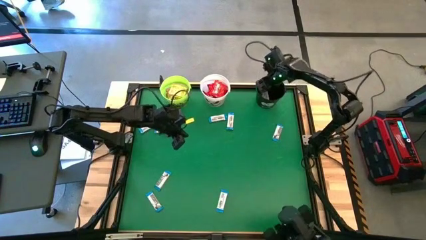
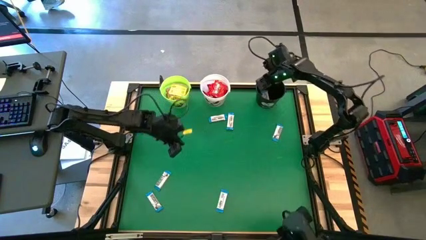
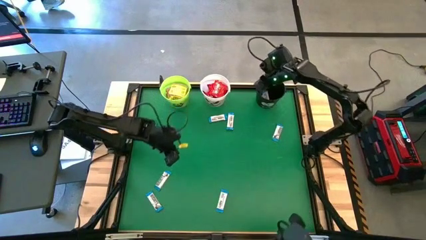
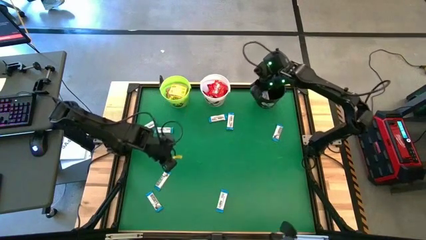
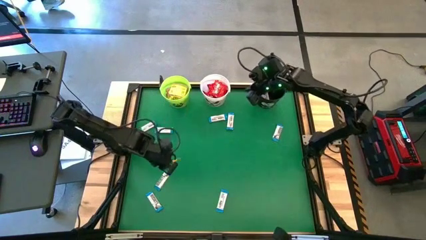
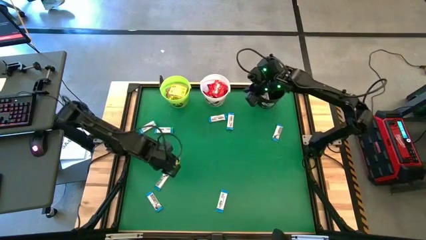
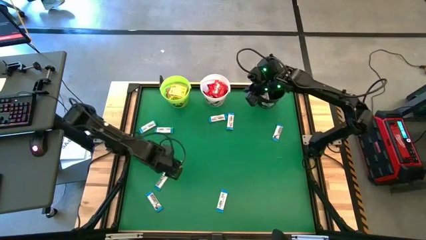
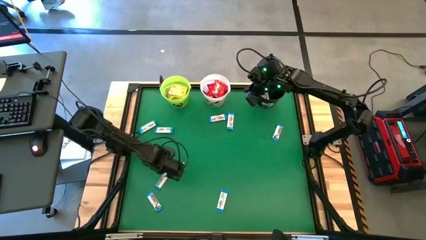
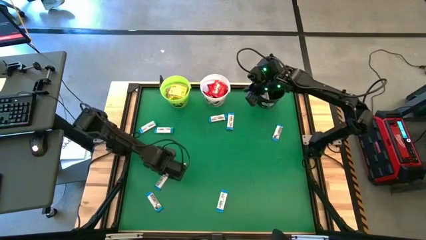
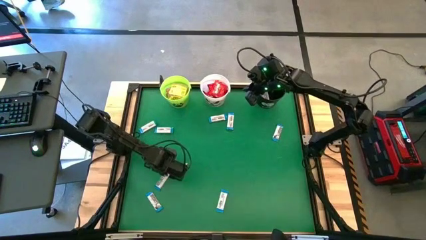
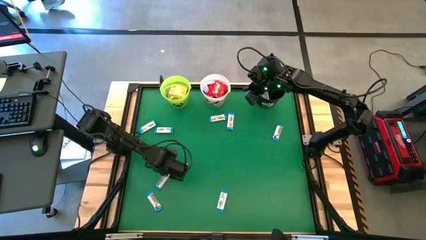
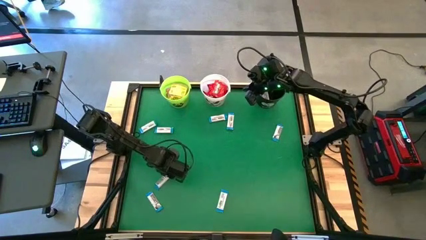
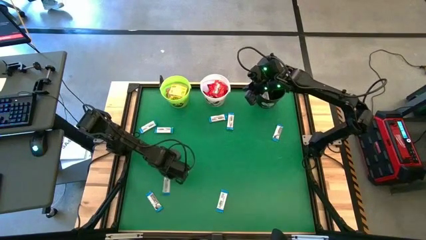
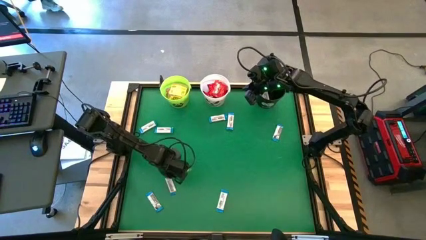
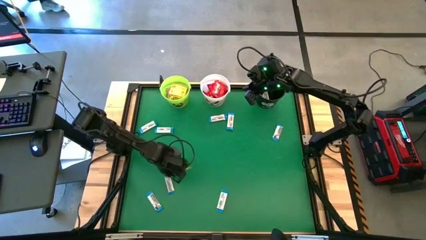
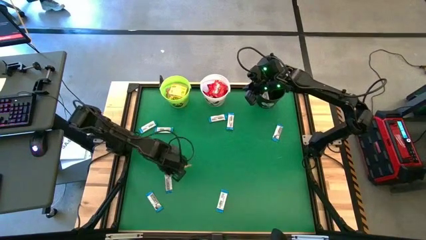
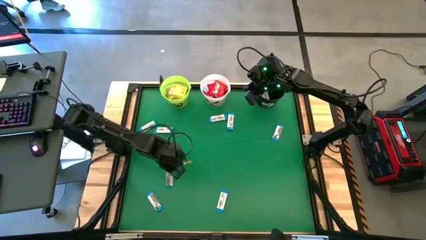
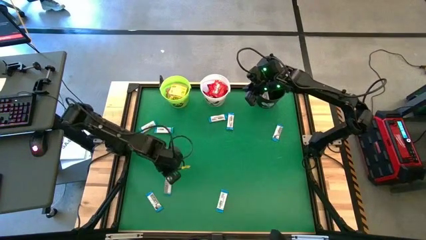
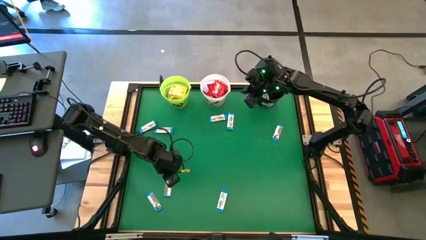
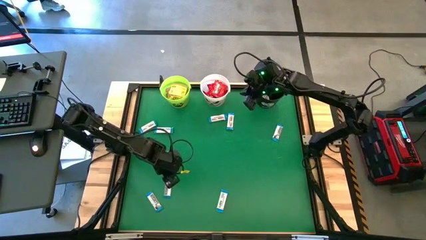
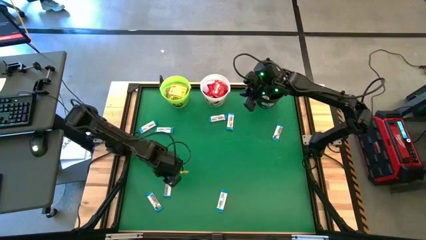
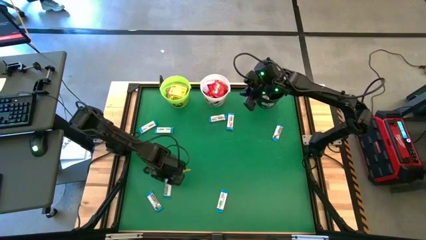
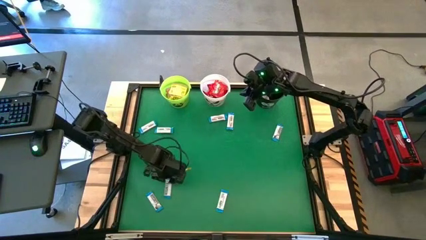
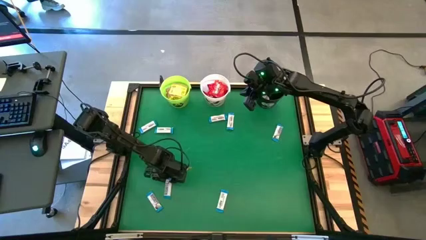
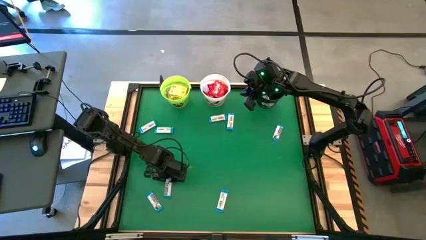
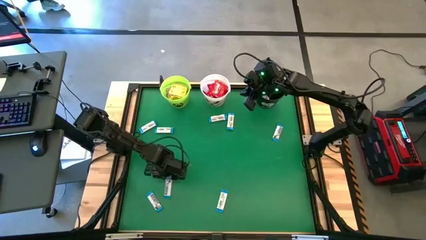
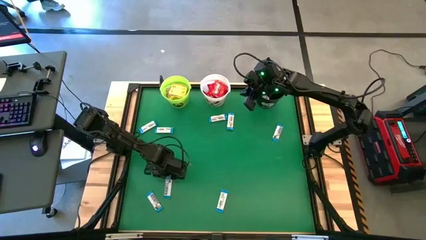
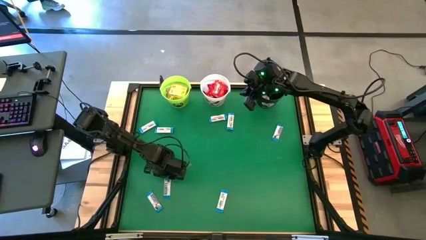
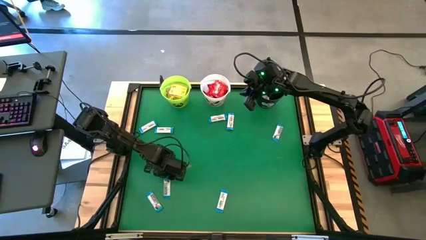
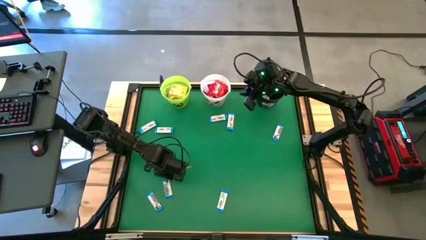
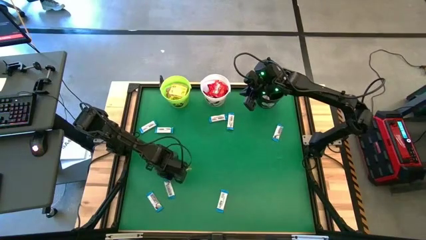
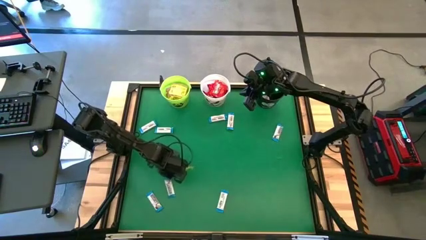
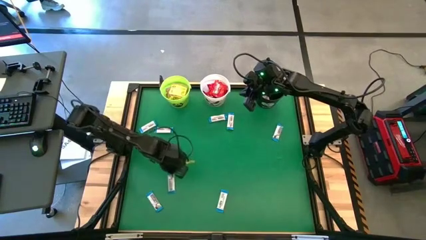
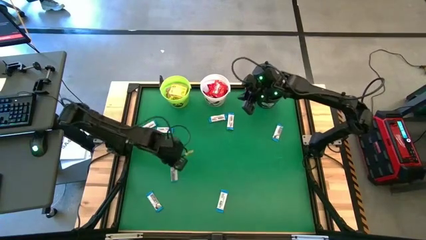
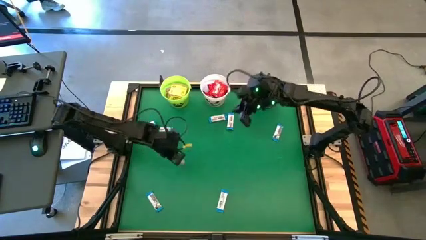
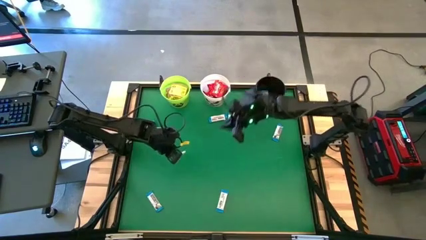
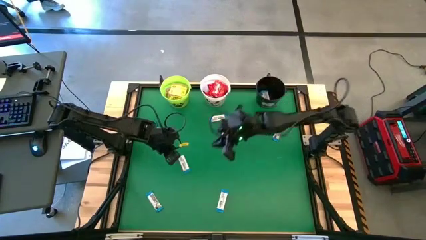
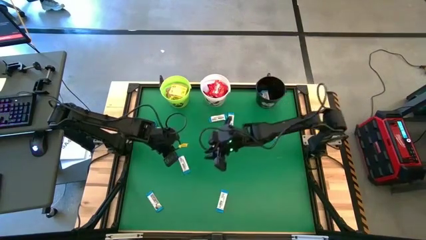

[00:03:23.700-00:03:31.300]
Task: Sort candy by brand, put in halloween buckets
Put the white chocolate bar into the black bucket

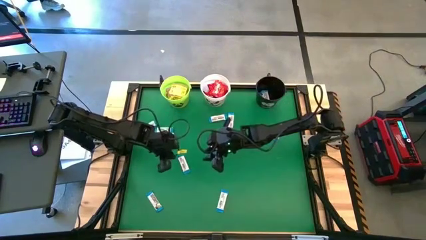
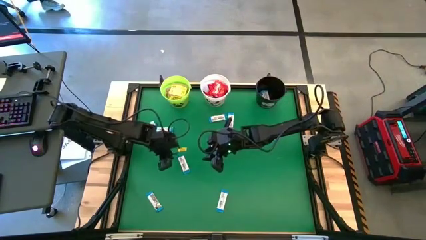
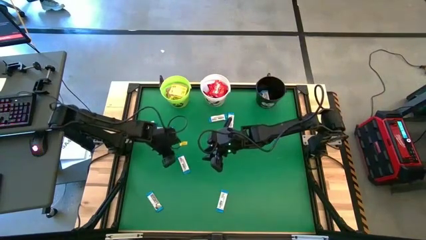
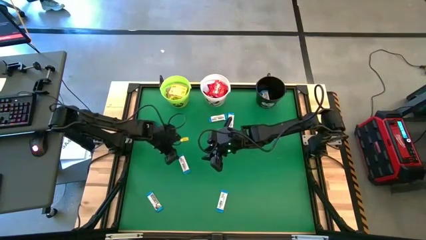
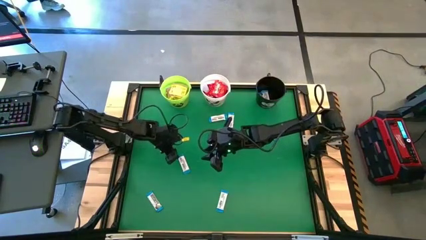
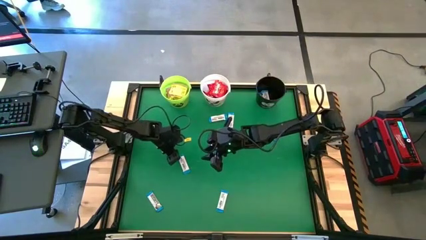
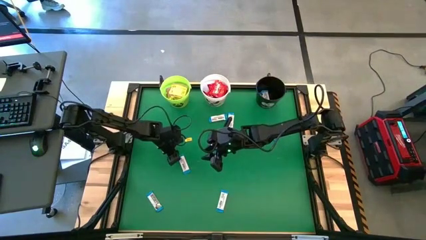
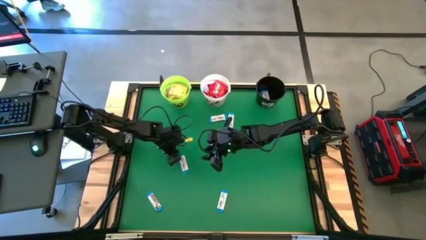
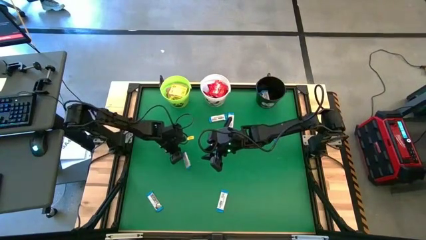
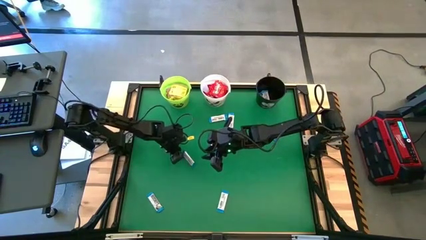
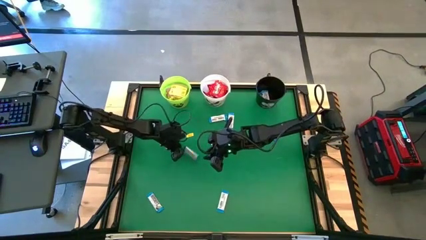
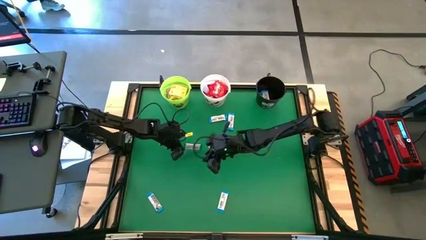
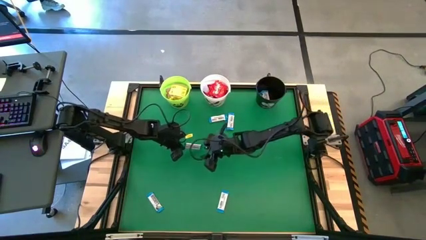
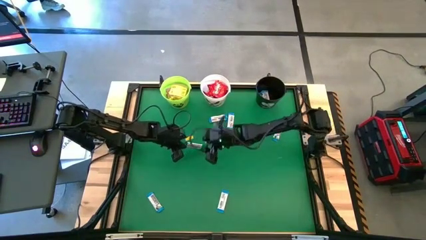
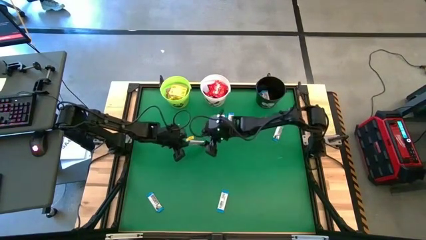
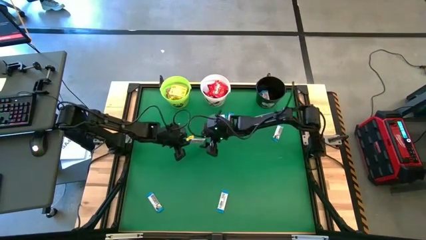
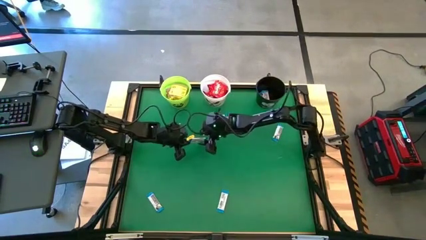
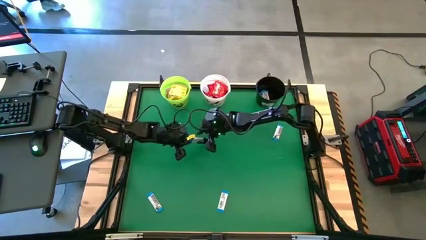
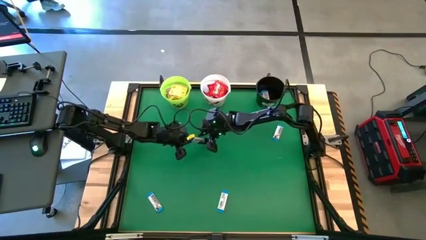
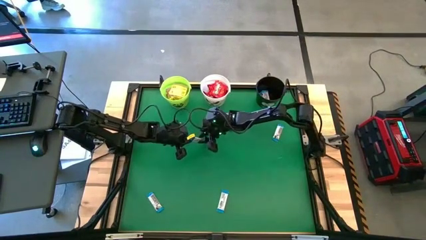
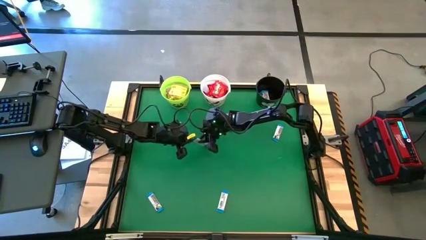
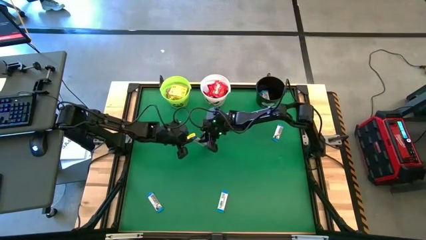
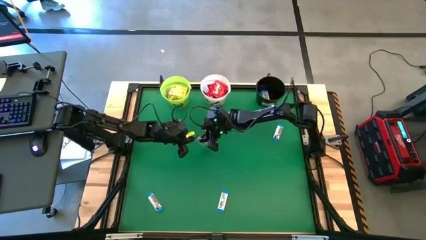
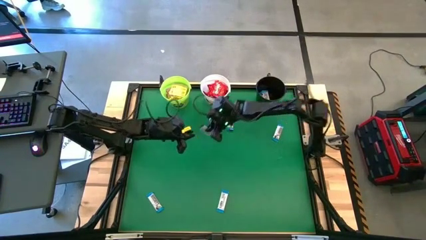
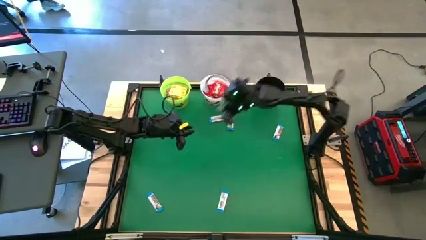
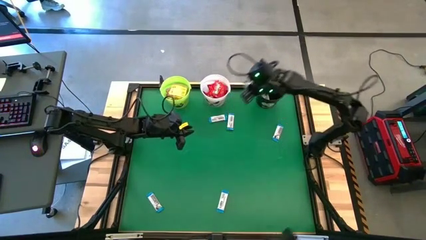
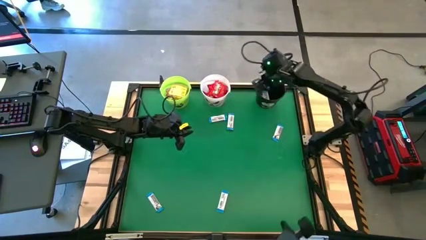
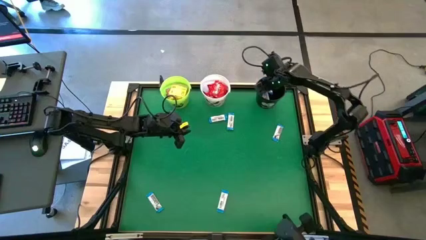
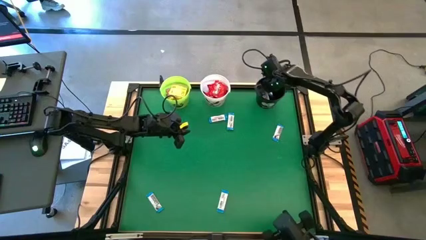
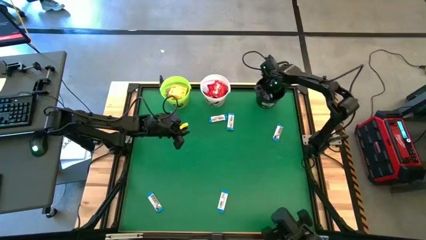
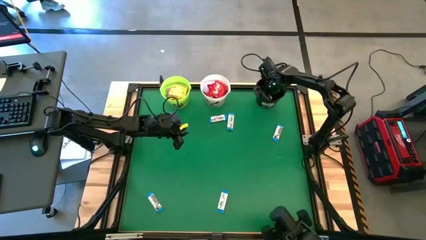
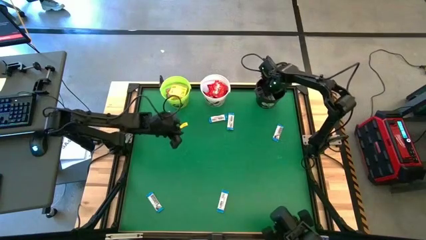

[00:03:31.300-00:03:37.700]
Put the white chocolate bar into the black bucket

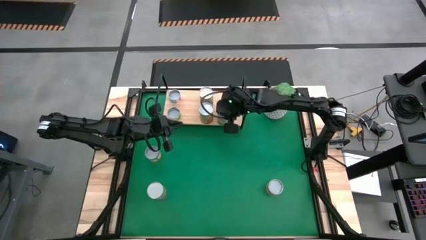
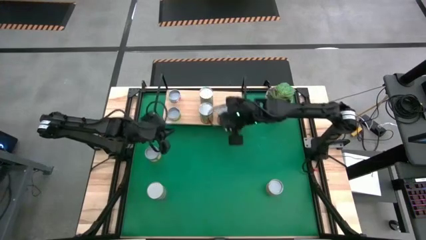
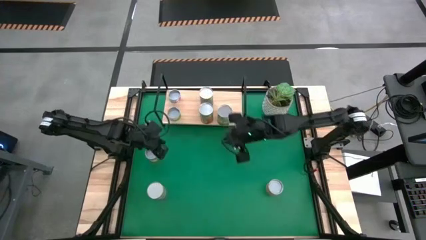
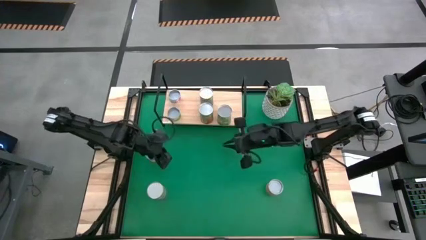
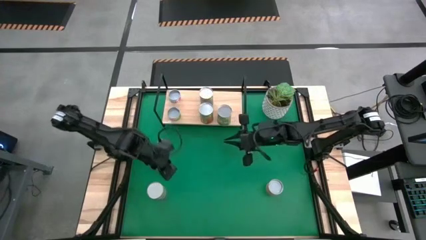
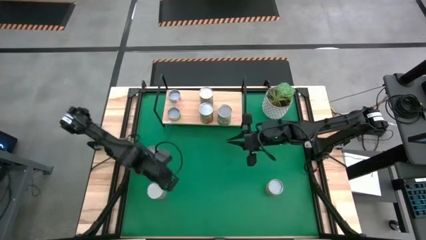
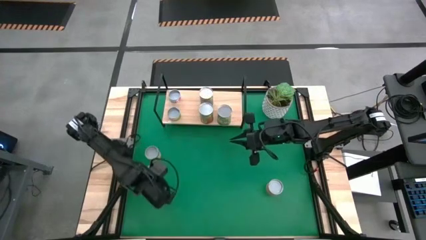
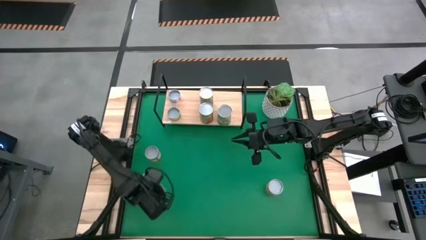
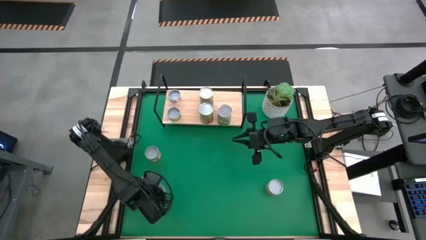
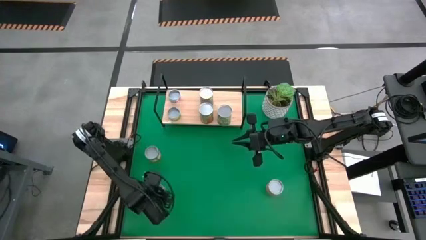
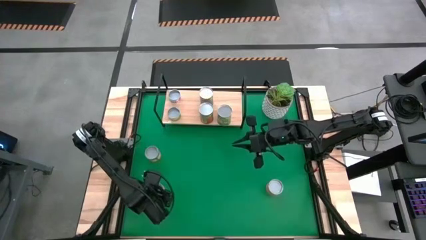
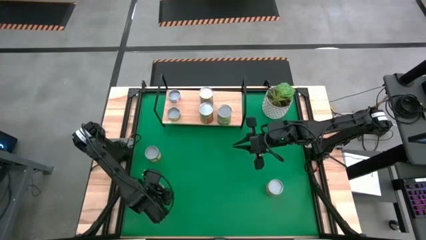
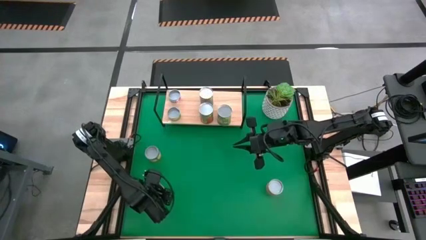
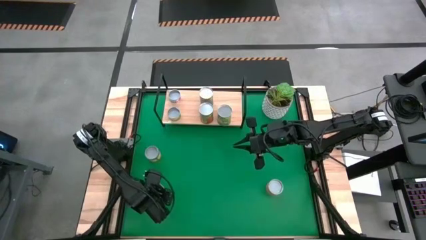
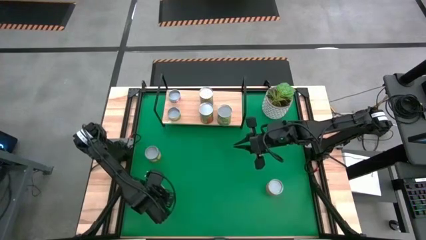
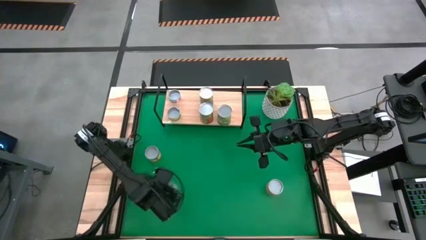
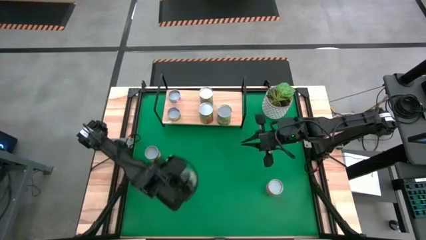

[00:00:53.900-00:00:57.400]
Task: Pick and place cans onto a shelf
Put the canned peas on the shelf
